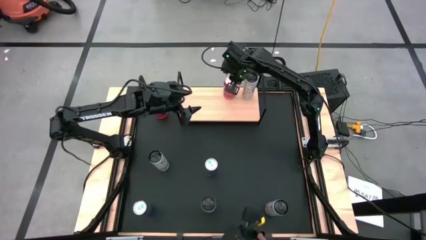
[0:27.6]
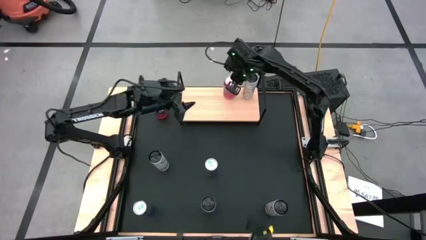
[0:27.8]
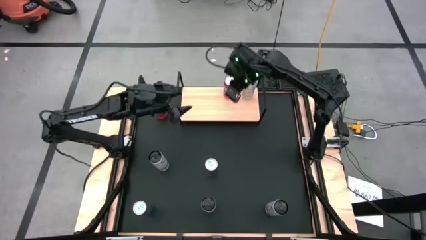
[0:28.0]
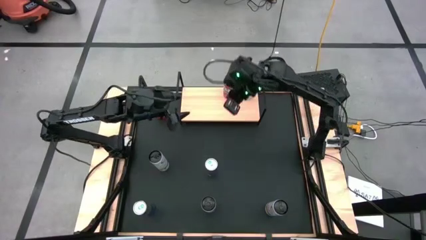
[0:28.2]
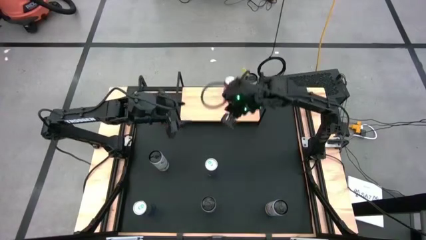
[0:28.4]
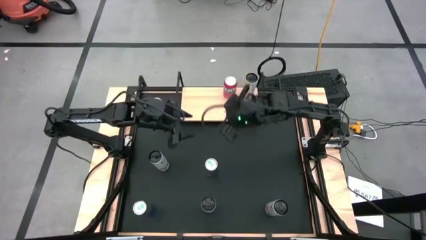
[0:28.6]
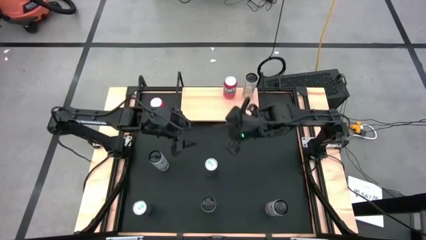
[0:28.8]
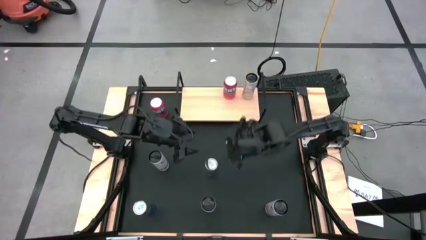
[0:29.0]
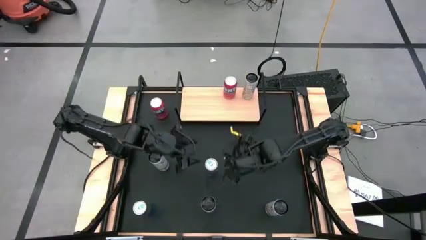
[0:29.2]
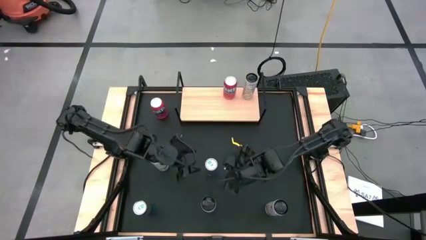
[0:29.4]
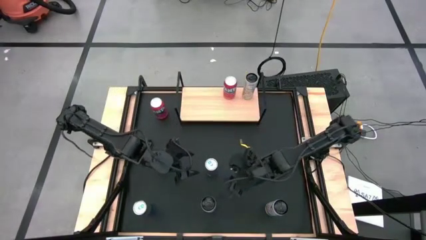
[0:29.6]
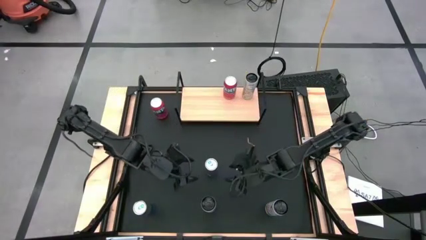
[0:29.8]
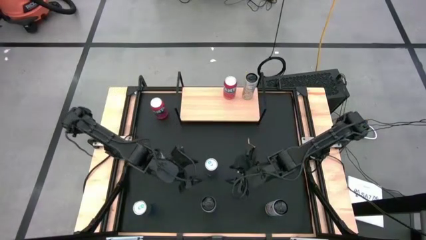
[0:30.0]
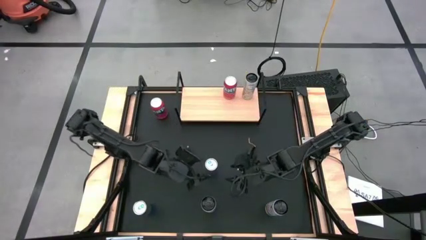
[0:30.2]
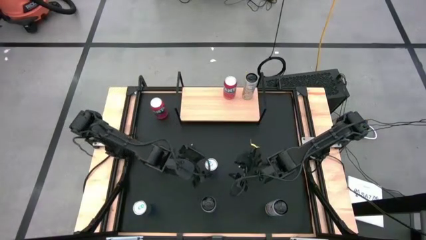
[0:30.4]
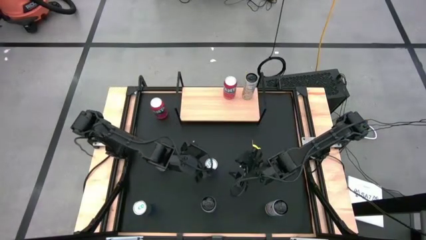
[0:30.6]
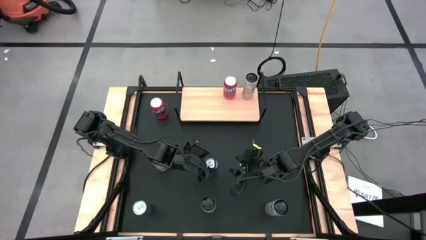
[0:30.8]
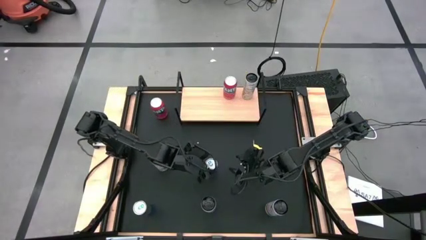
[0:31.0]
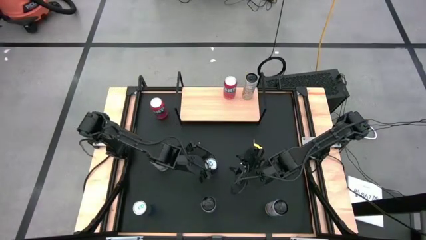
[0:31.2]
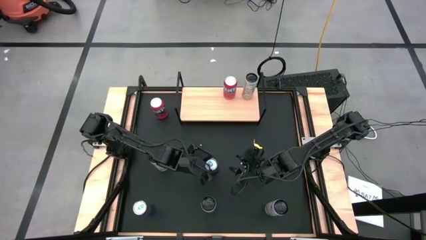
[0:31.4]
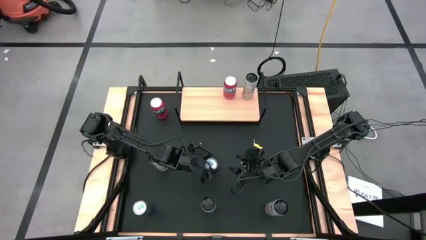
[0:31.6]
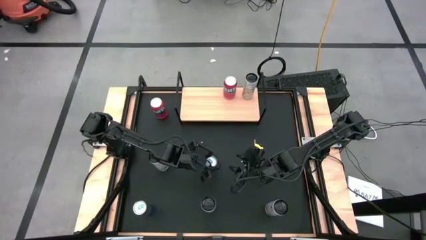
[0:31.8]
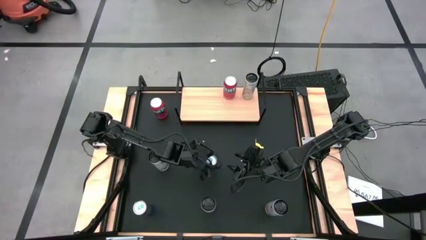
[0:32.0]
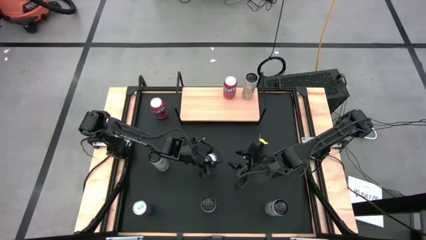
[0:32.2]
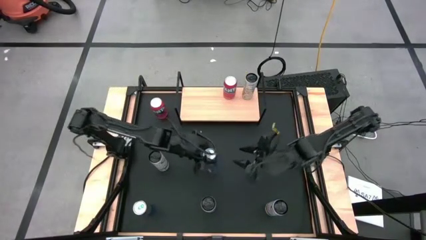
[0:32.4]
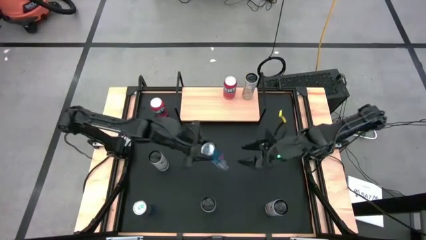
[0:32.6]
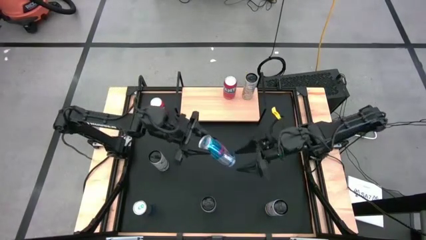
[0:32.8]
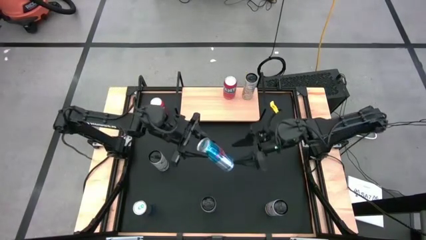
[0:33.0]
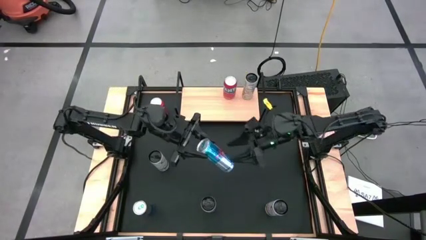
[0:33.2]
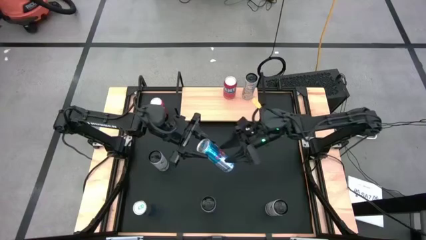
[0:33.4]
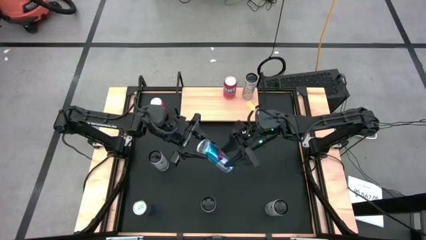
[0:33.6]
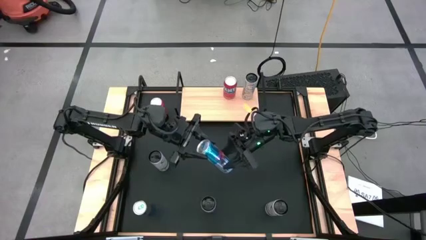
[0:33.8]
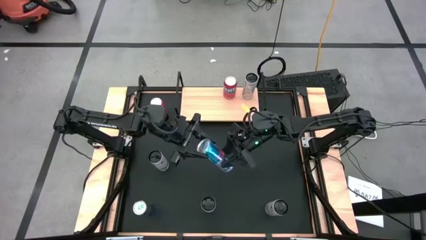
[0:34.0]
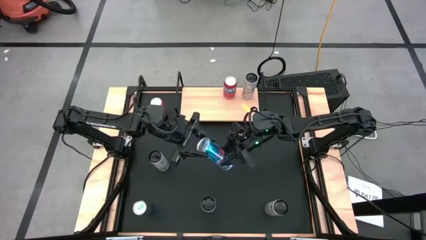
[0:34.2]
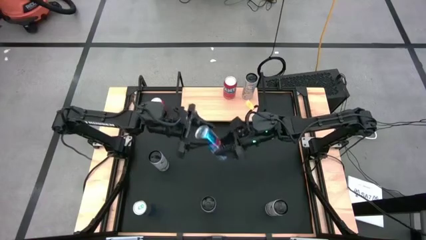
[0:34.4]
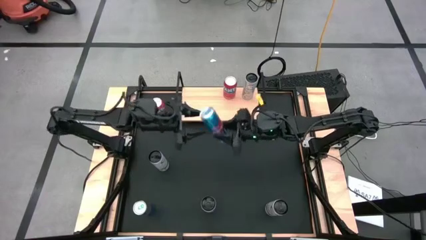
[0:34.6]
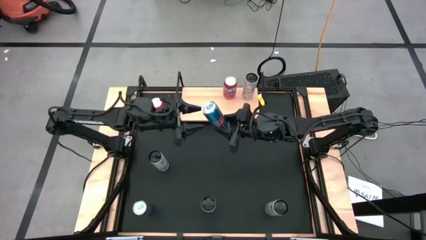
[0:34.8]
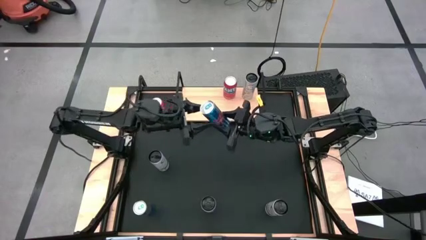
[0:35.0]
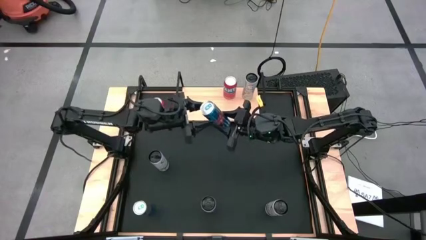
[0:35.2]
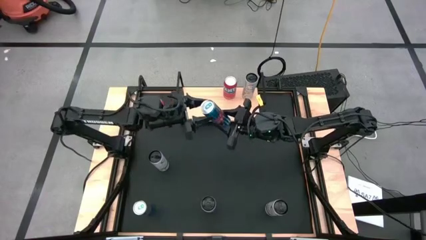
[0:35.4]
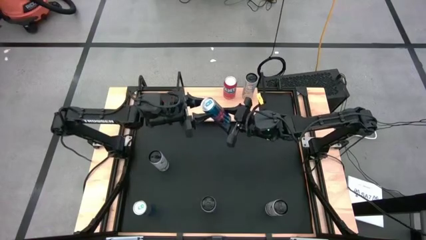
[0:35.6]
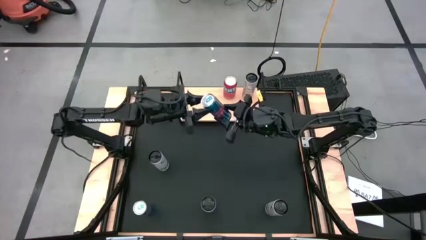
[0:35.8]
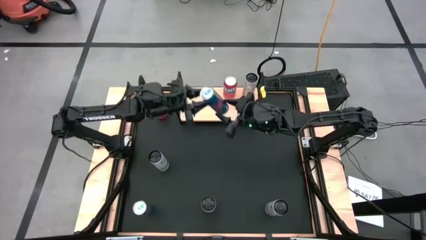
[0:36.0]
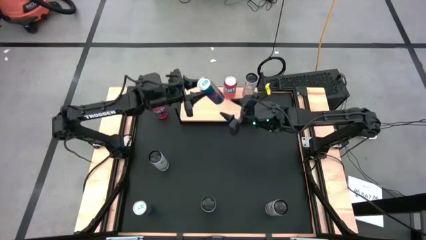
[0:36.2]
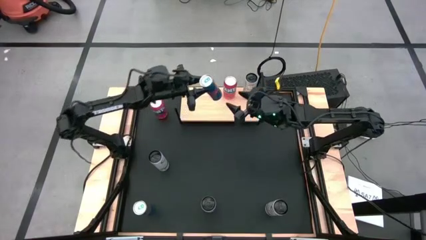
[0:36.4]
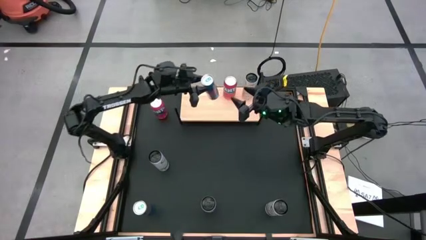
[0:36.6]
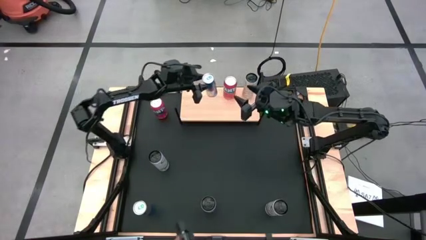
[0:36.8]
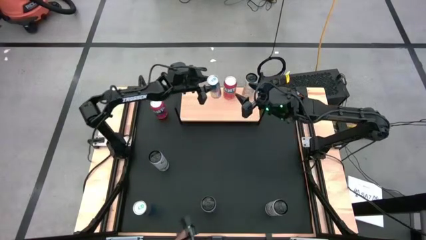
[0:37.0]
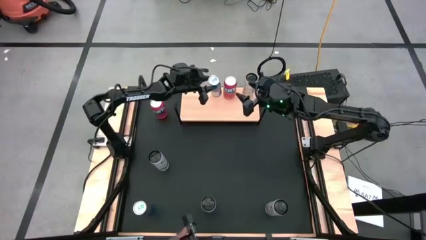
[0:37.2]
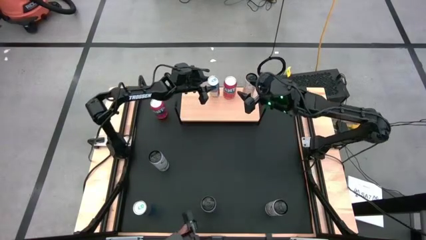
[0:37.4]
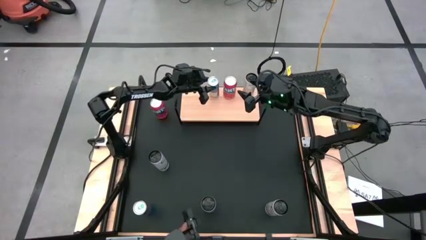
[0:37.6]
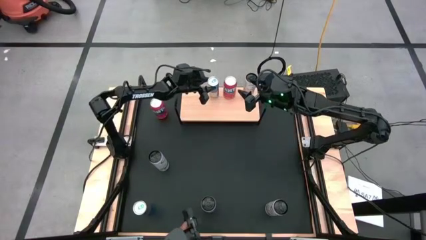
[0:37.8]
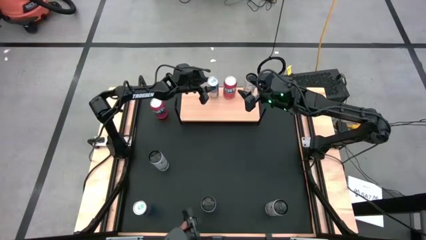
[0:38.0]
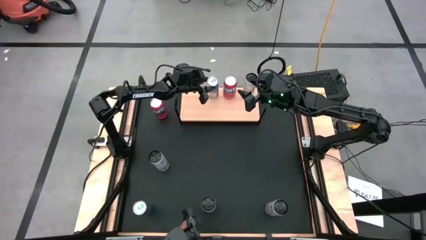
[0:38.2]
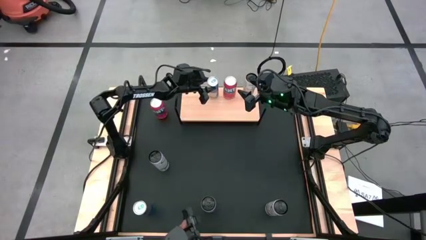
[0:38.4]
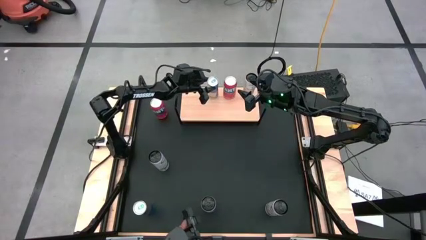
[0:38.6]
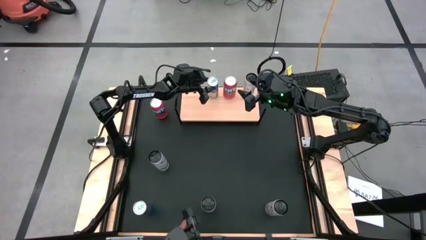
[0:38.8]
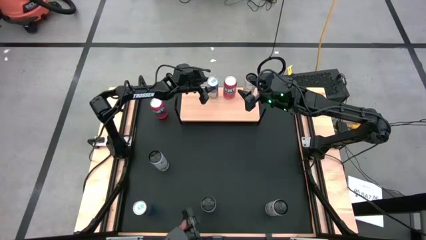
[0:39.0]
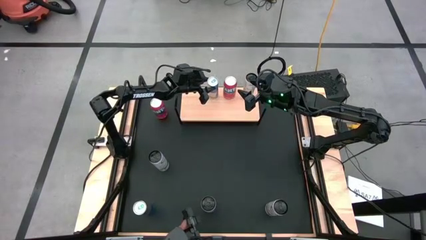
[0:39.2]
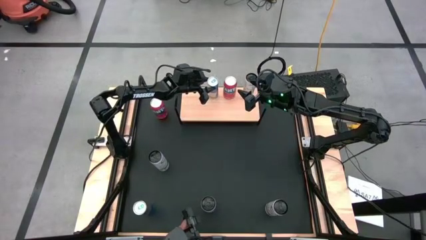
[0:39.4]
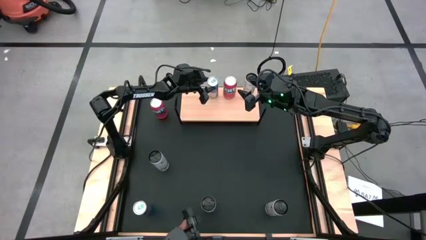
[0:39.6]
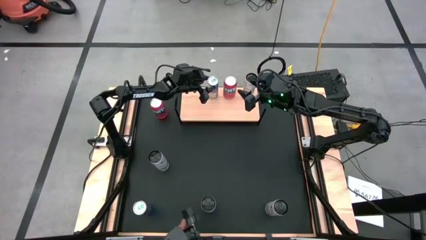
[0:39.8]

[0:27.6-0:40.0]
Task: Place canned beverage on shelf
Put the top blue soda can on the shelf
